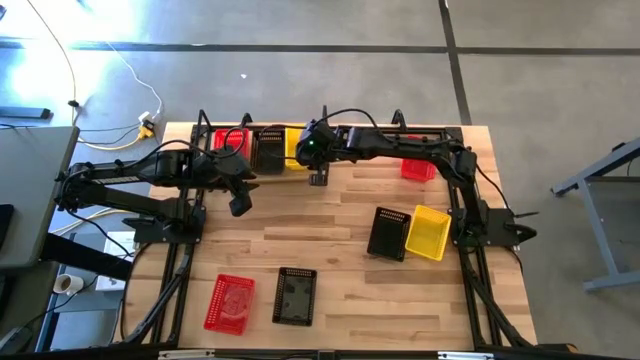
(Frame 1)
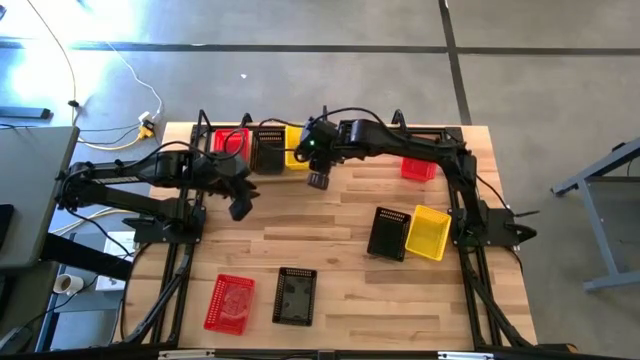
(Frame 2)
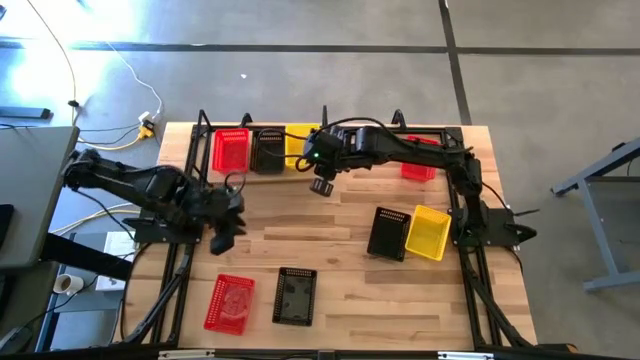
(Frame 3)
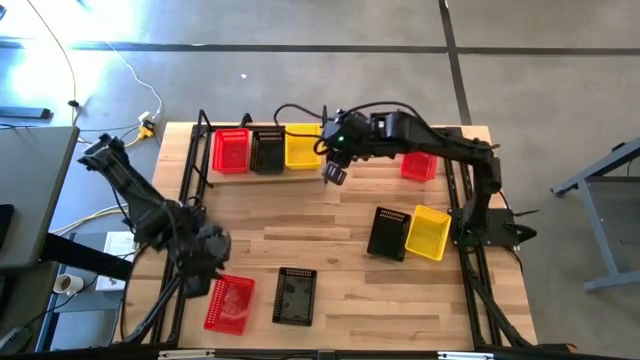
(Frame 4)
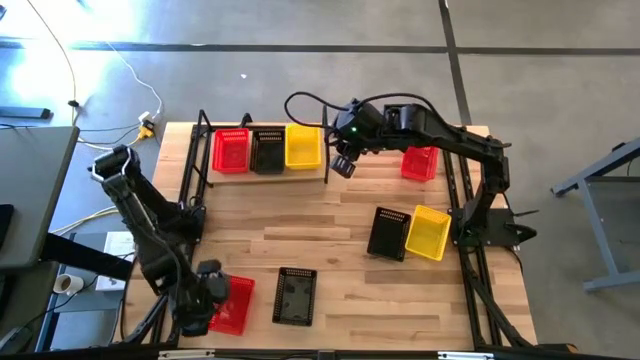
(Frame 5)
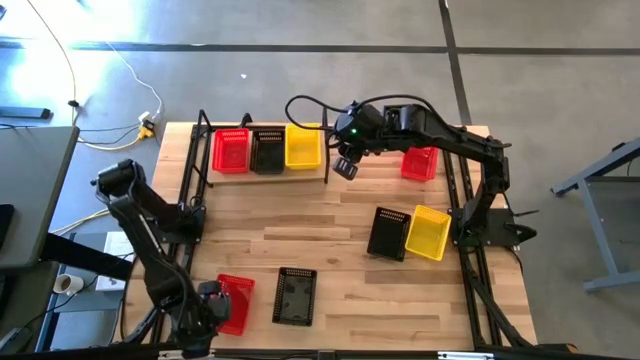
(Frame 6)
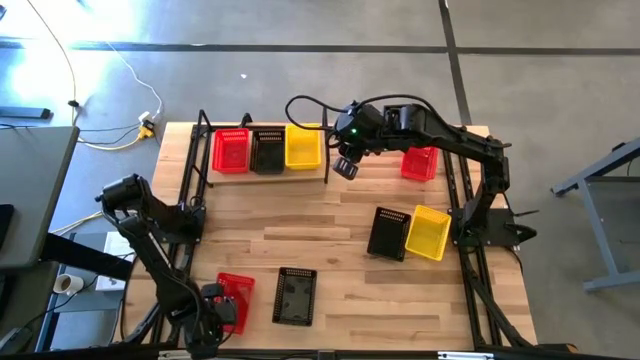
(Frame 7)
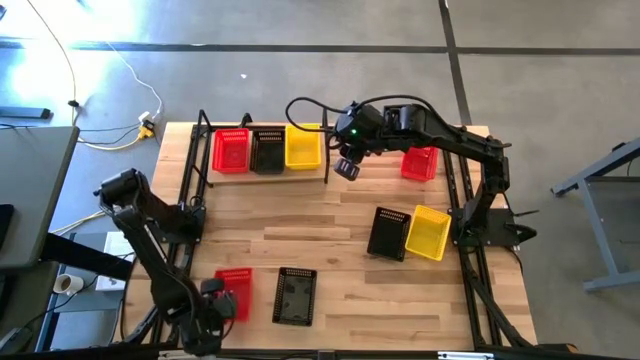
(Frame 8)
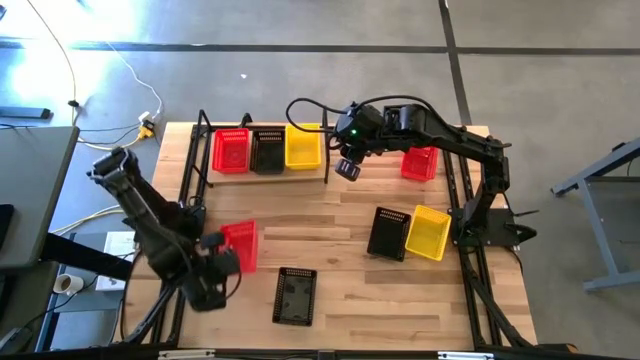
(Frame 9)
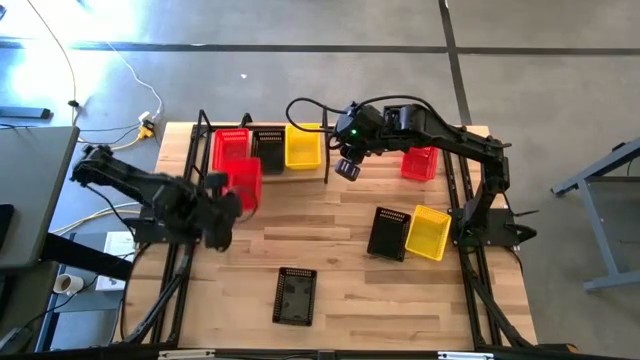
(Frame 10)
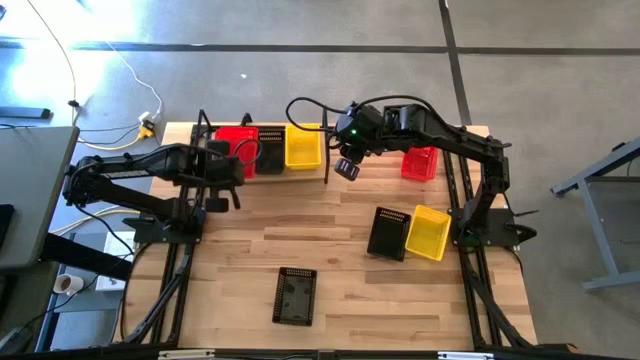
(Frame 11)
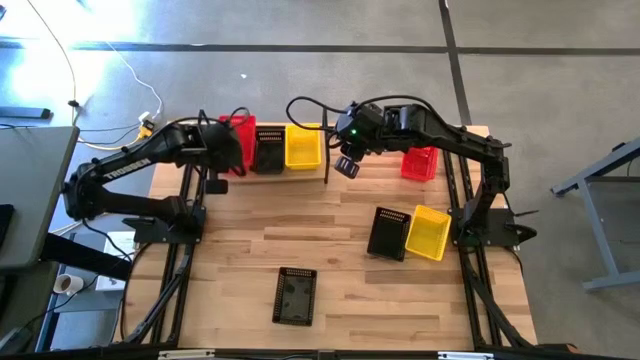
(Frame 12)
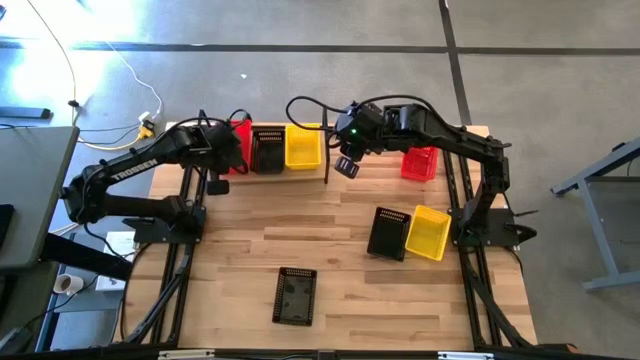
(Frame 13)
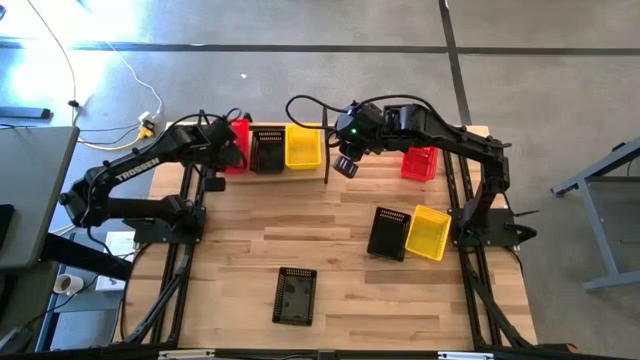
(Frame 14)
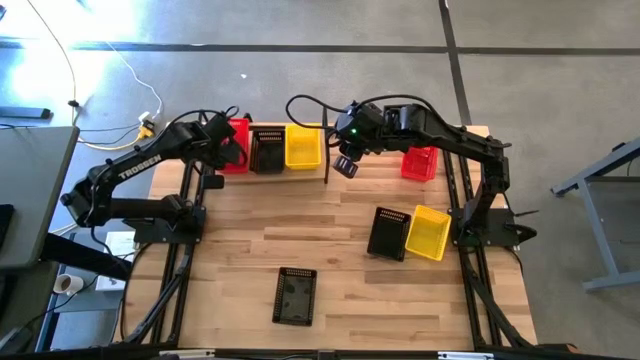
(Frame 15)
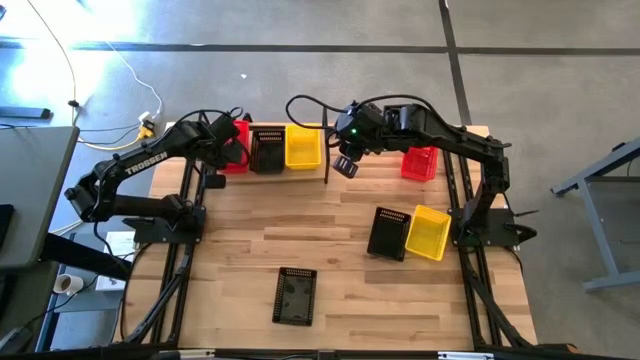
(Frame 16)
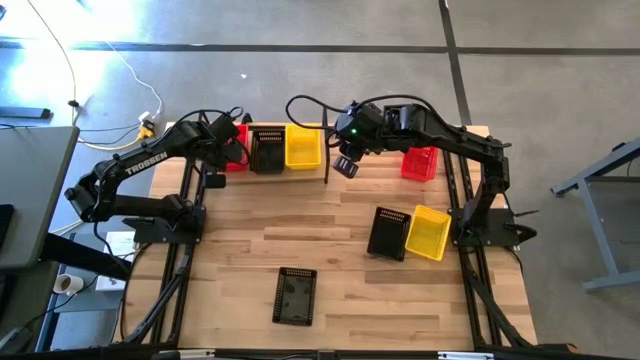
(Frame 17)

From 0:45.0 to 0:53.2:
Task: Stack baskets on shelf by color
Stack the bottom red bin on top of the red bin

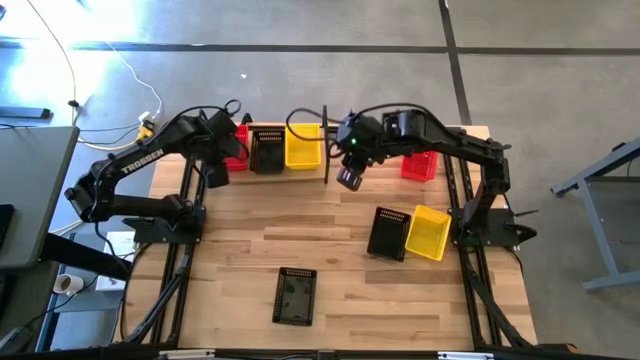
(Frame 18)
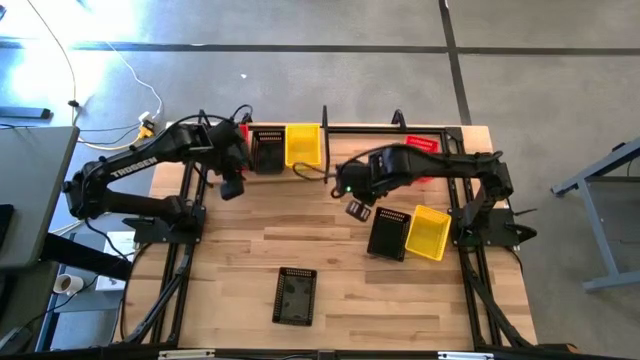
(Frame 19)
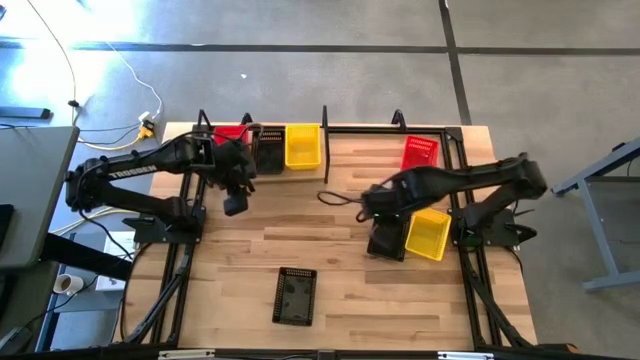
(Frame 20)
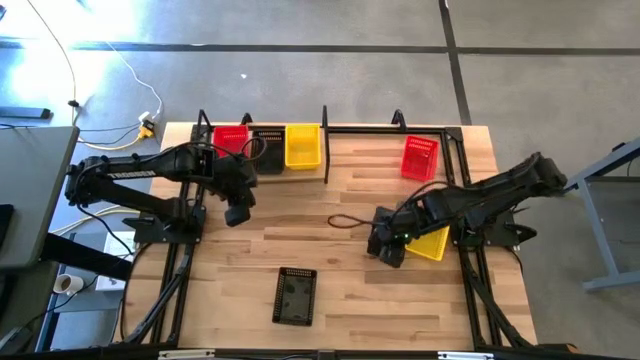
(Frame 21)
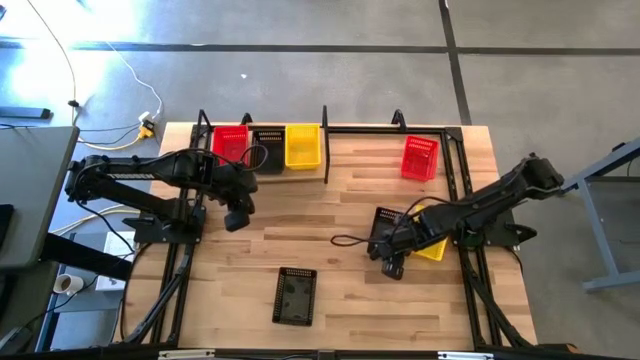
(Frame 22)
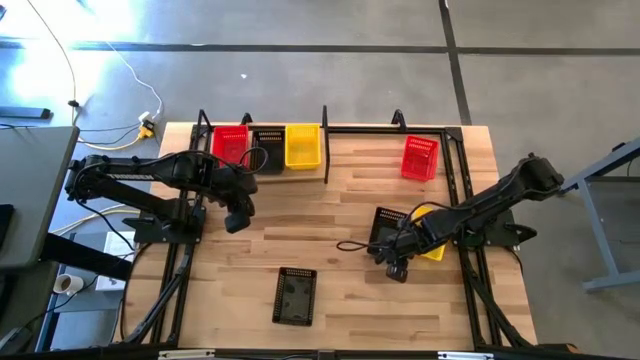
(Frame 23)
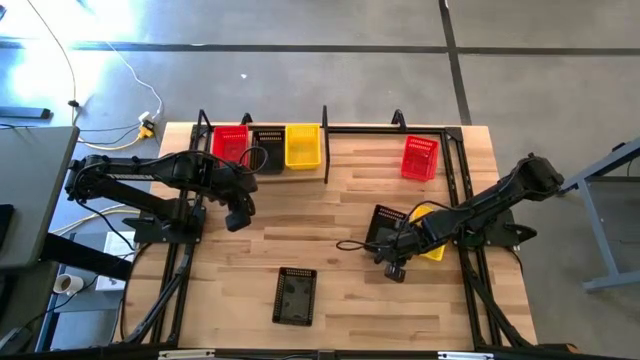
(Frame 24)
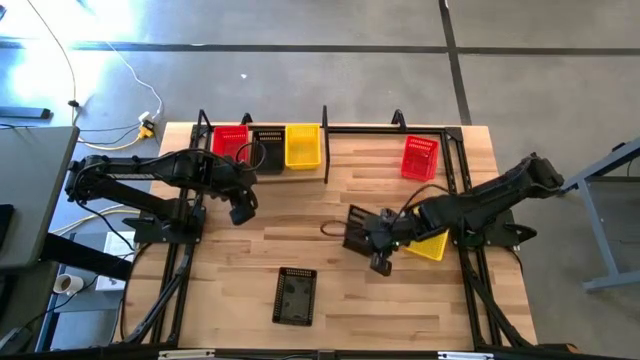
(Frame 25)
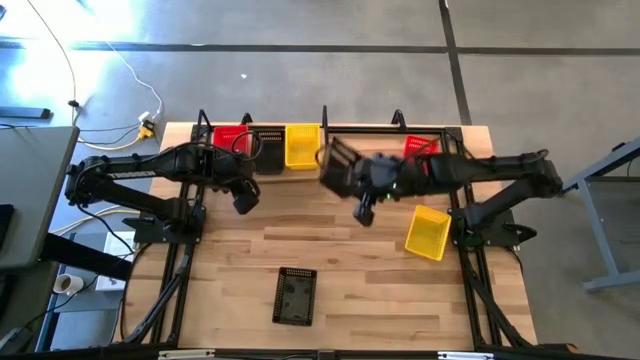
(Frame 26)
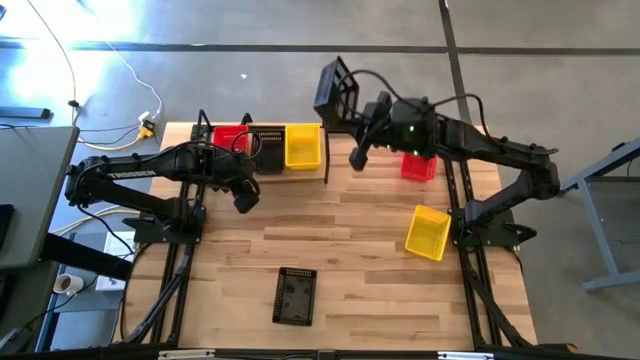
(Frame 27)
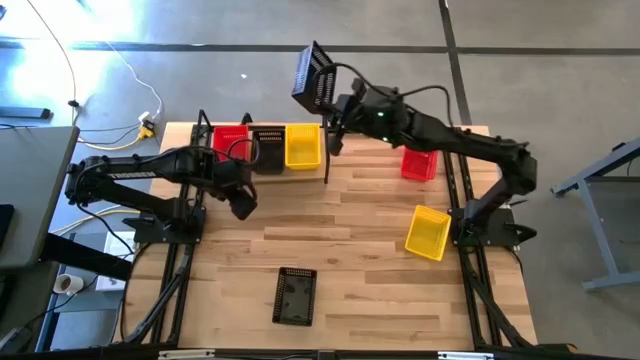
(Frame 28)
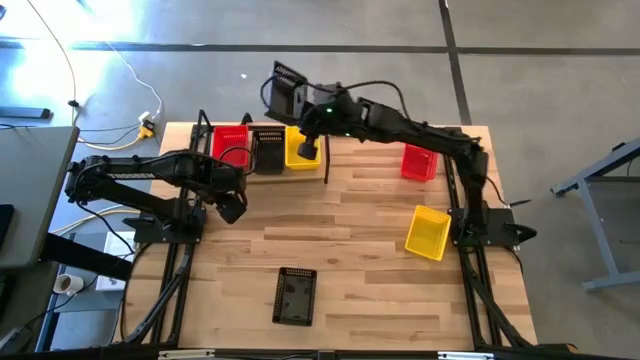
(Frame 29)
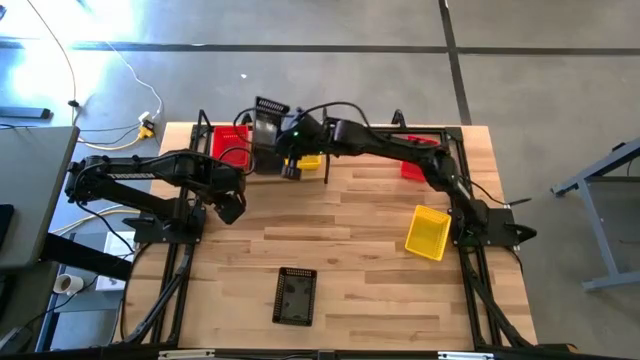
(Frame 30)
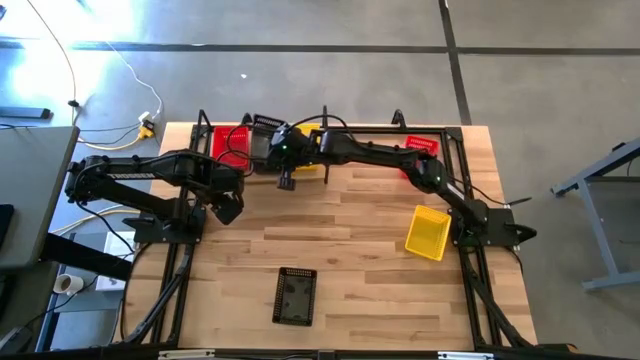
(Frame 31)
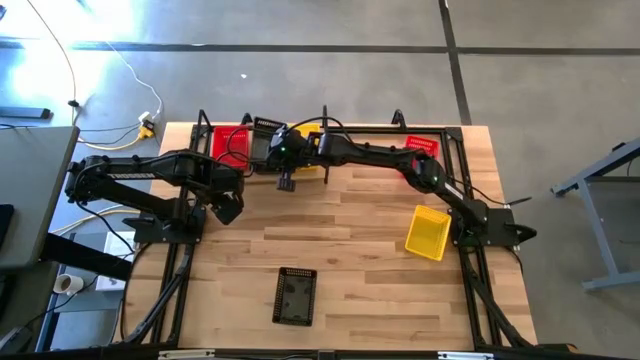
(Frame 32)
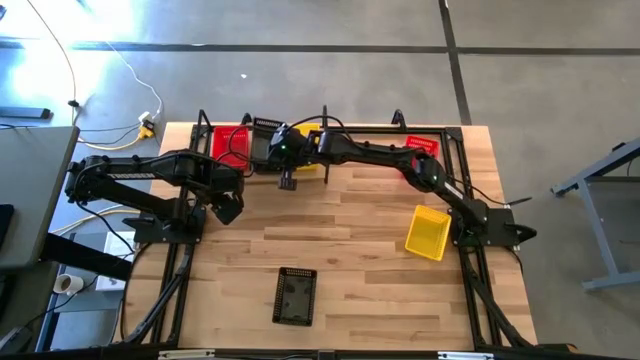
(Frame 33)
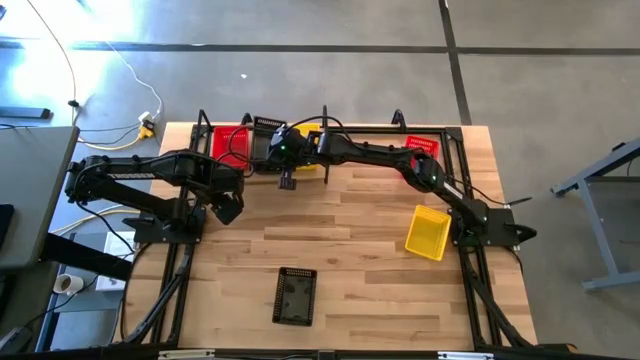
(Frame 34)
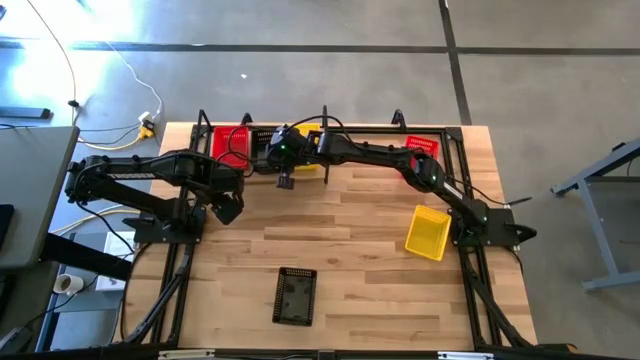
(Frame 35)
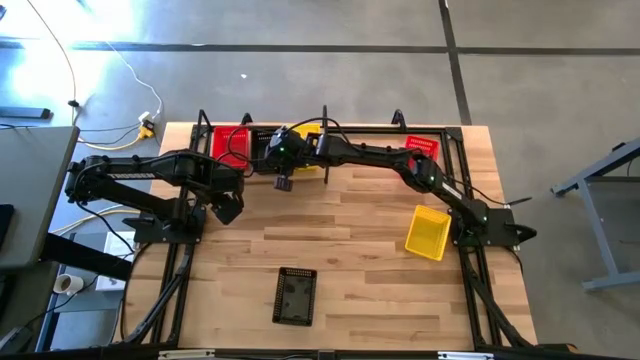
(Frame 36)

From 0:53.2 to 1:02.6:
Stack the right black bin on top of the black bin

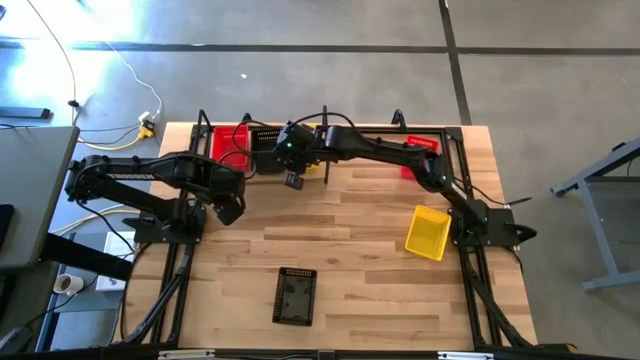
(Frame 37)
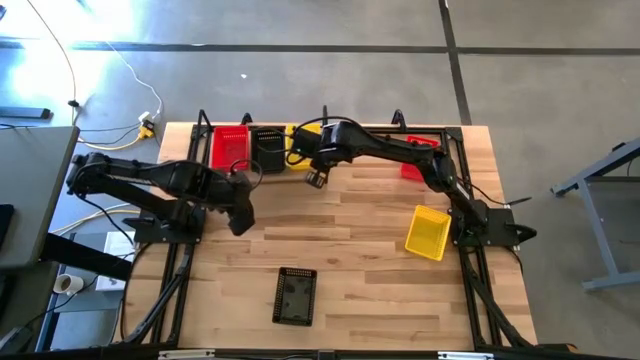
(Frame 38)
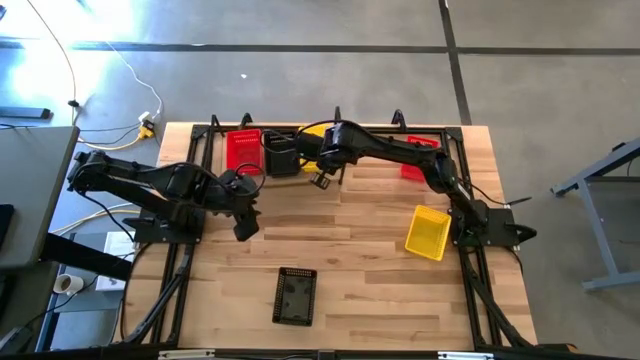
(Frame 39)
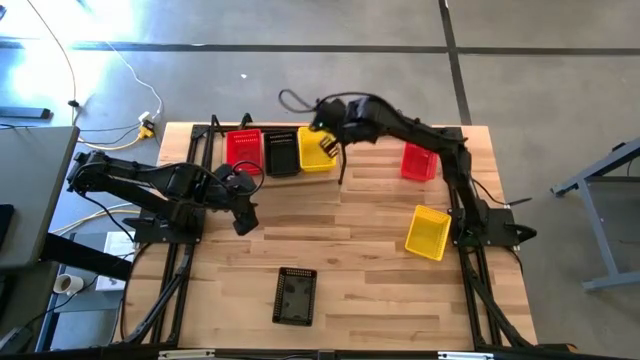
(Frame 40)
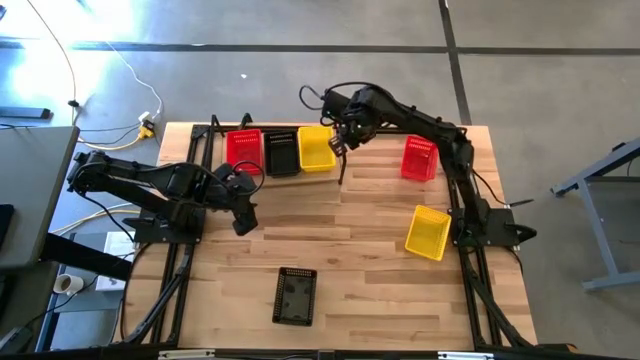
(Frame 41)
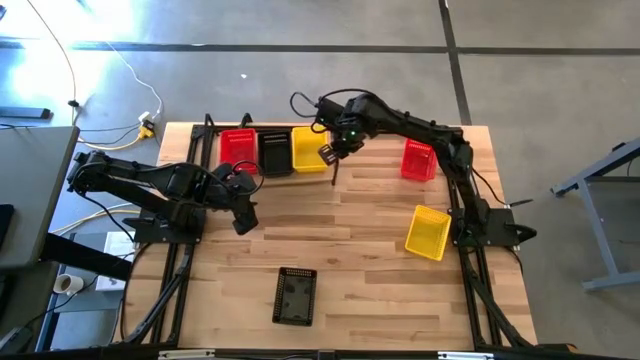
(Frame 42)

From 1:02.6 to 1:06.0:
Adjust the shelf

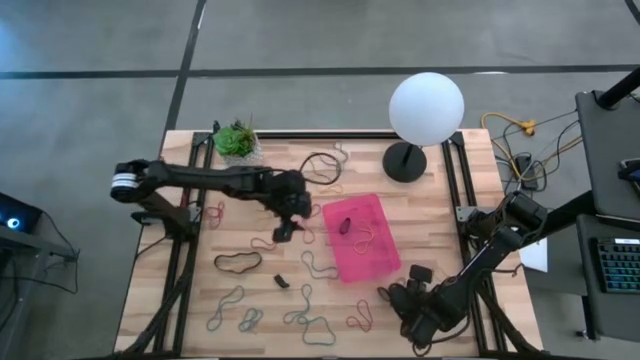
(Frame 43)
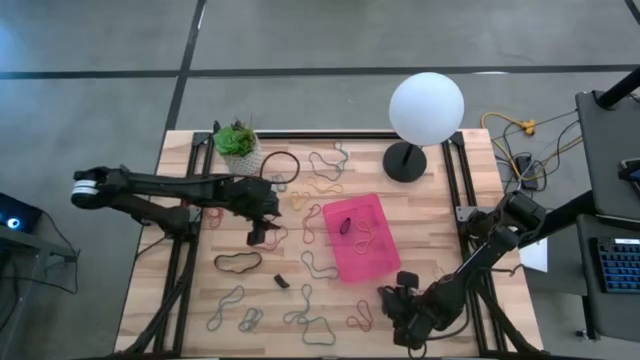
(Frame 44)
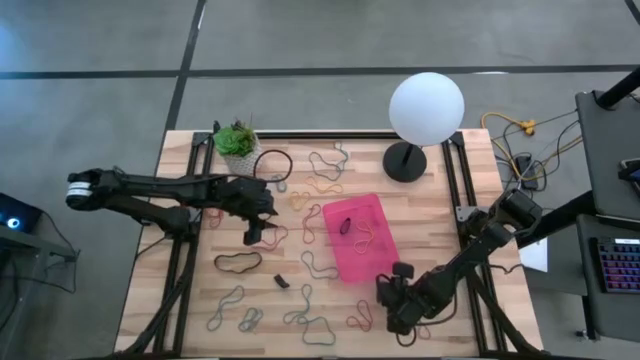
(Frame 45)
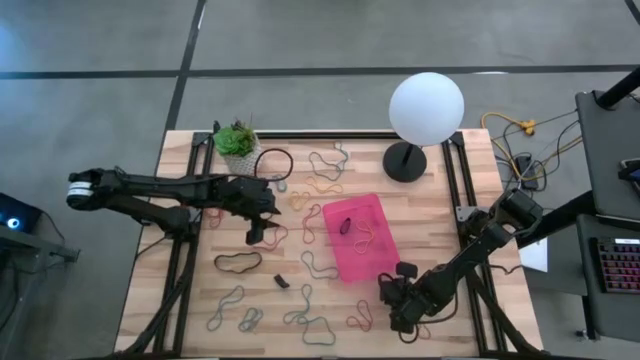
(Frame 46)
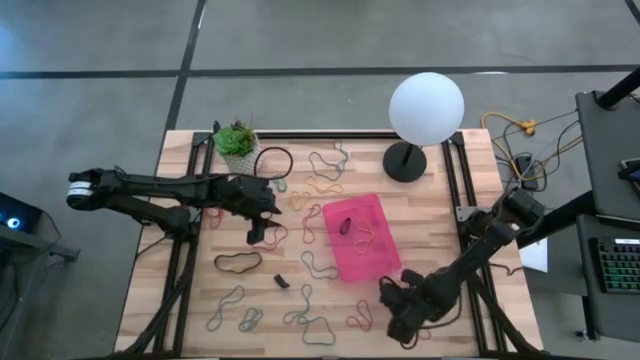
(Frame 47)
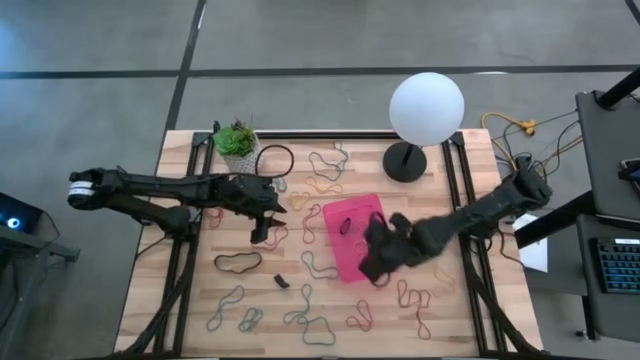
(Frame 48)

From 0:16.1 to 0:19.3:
Task: Pick and place rubber bands into bin
Put the black rubber band into the pink bin
